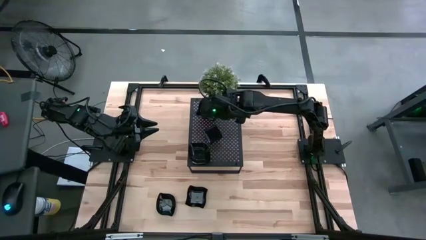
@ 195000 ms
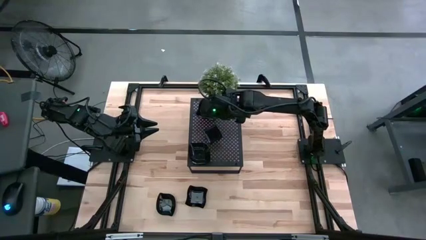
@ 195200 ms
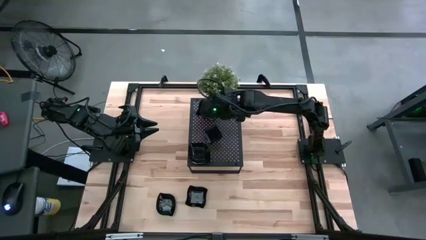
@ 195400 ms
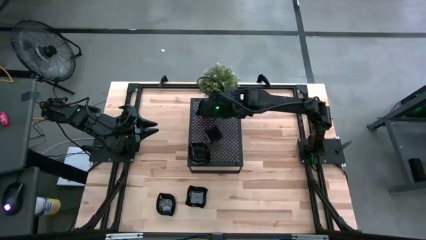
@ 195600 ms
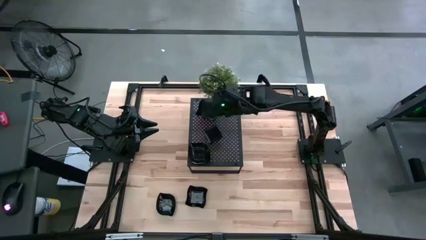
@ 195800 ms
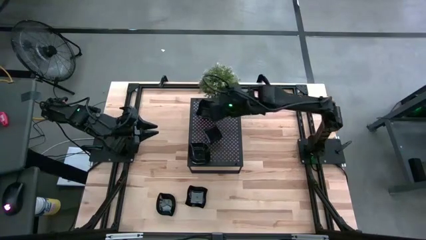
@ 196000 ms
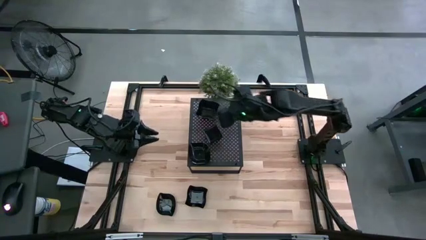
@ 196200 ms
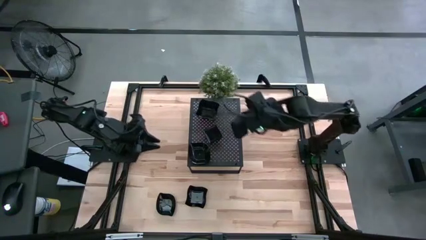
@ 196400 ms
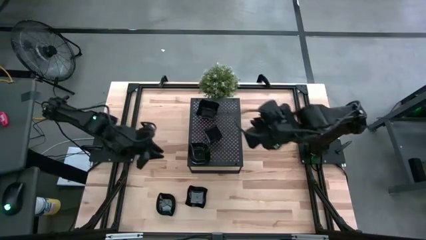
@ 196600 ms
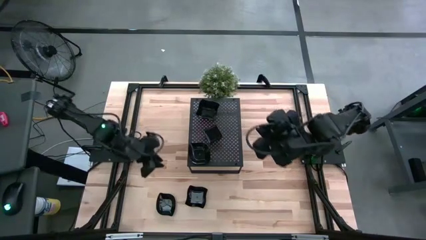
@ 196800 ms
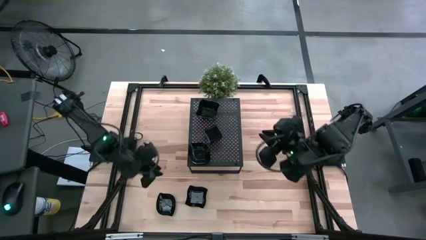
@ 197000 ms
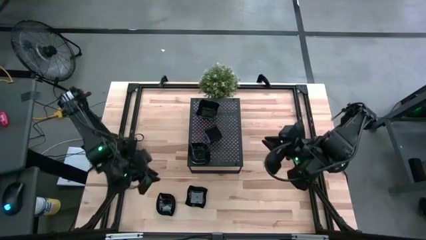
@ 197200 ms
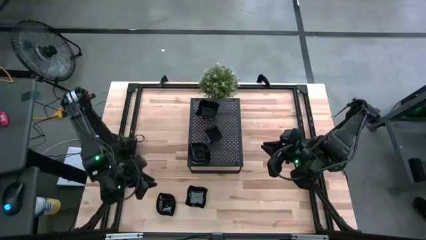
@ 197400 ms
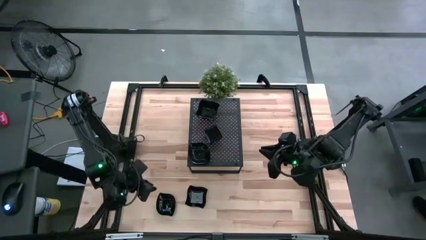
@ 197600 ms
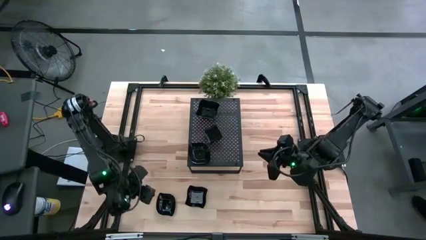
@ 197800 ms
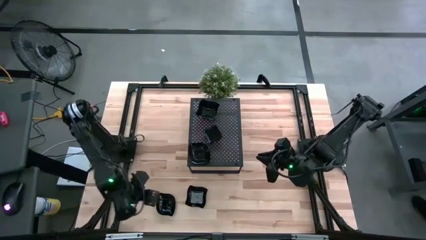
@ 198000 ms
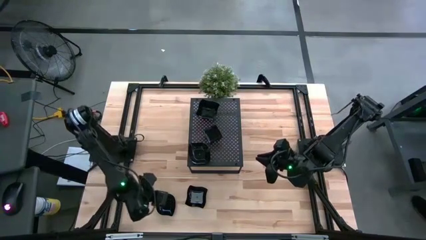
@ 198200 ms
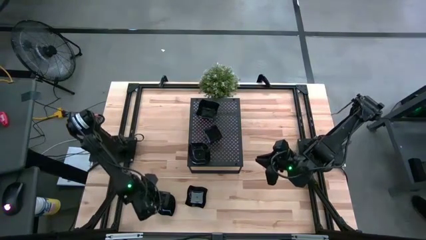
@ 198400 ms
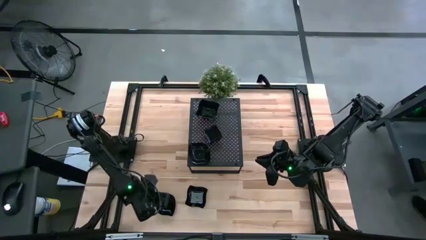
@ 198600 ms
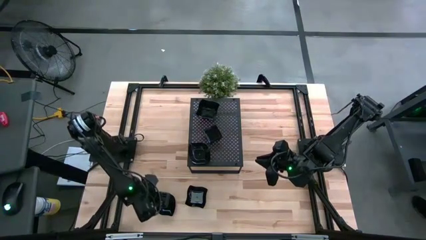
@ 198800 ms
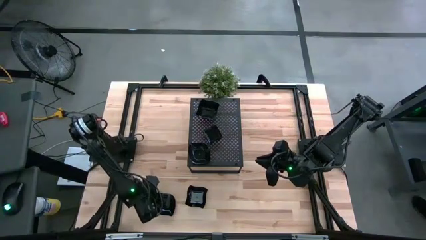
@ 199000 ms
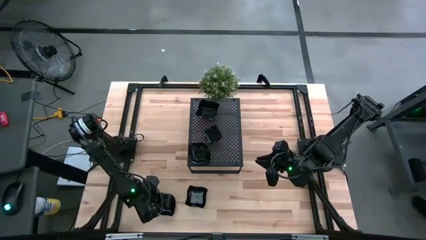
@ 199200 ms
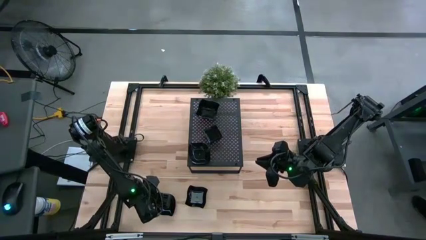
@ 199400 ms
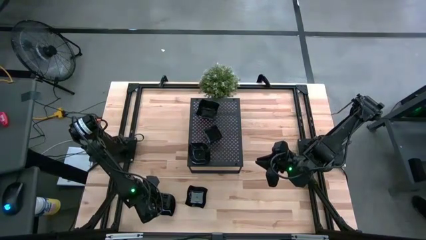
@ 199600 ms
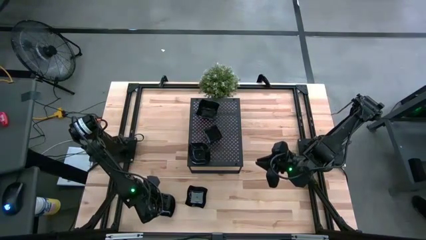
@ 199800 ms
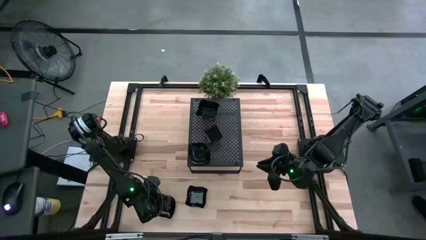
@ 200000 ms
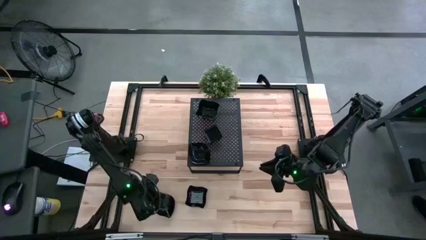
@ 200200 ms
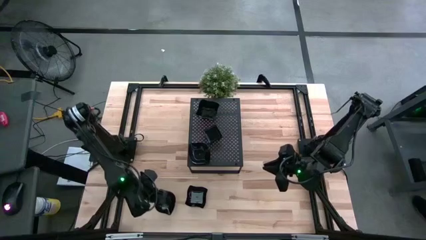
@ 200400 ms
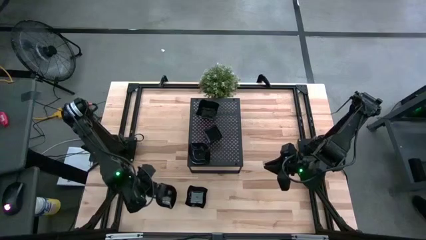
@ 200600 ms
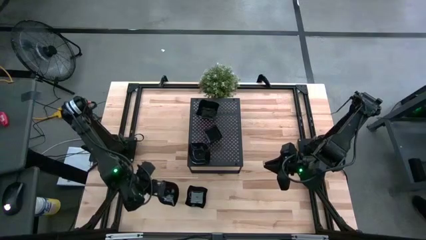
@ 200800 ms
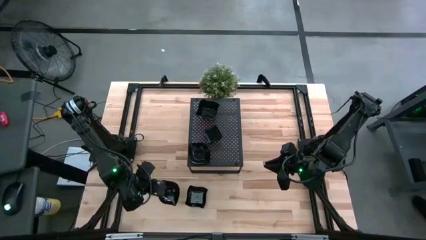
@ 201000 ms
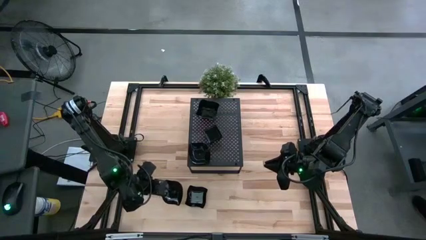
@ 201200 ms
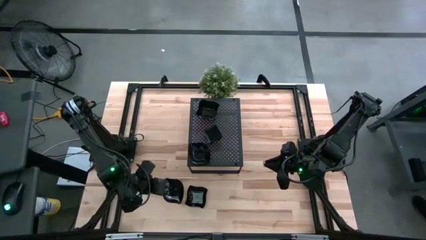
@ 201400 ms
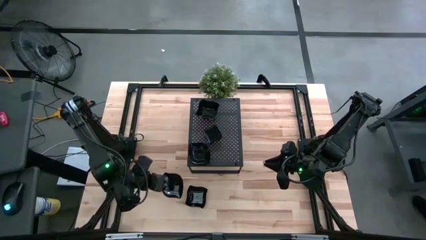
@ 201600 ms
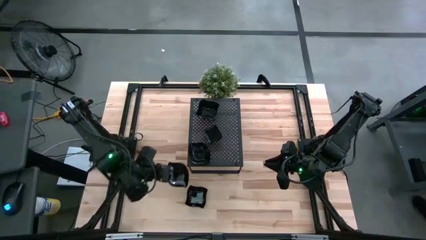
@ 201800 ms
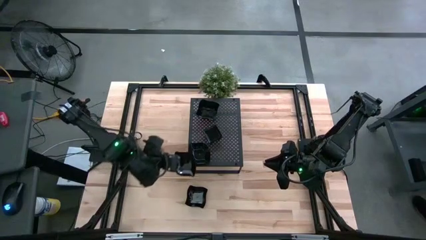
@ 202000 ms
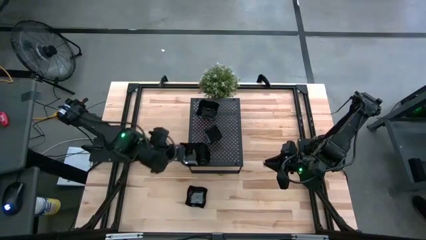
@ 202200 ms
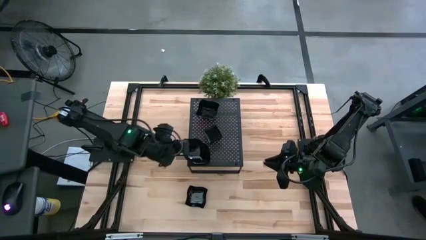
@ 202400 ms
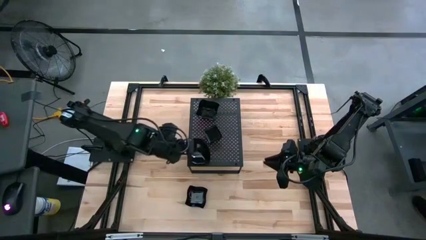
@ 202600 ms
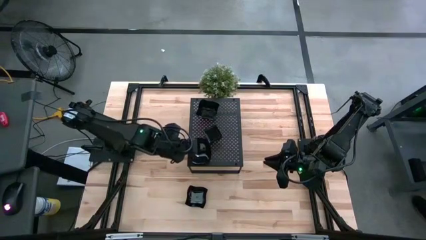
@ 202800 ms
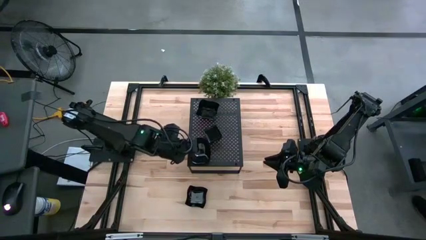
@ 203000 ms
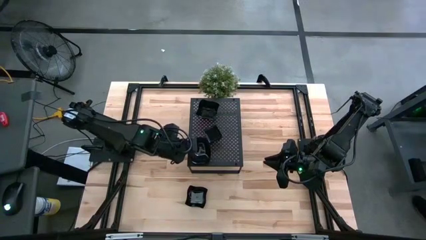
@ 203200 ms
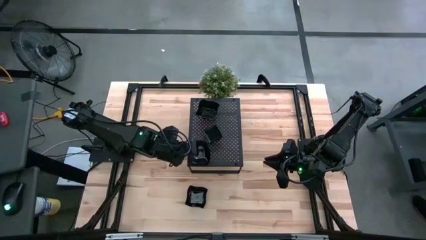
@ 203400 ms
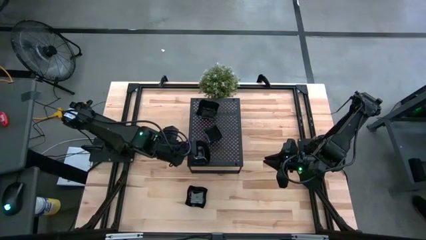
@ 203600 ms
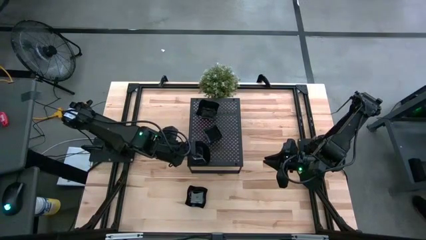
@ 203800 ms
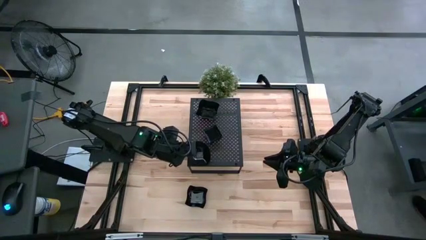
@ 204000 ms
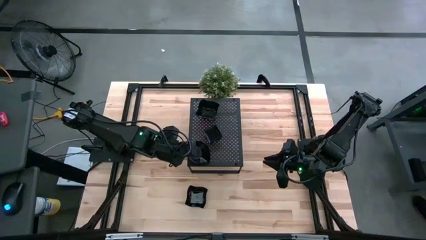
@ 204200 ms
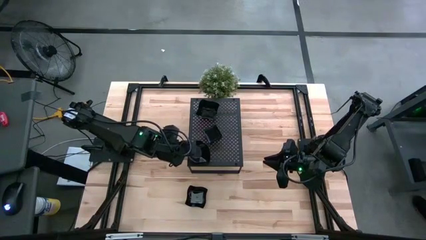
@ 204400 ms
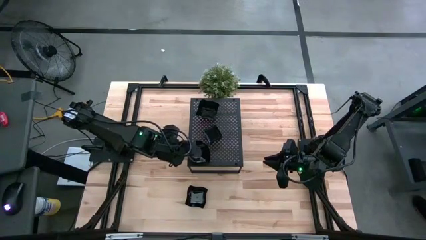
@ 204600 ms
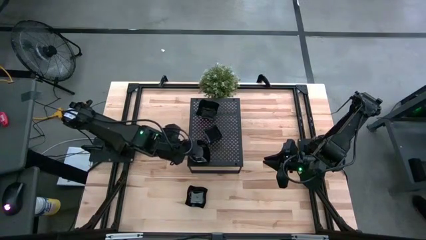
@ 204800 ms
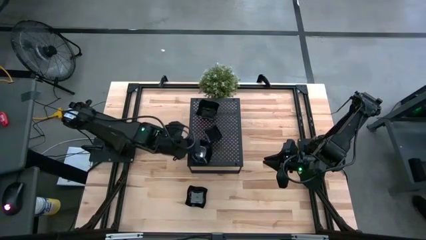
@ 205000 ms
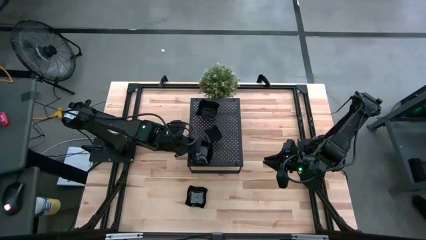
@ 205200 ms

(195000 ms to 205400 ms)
Task: Pick & Place Mini shaped plates
Stack the leaf-shaped plate on top of the leaf-shaped plates on the shelf
